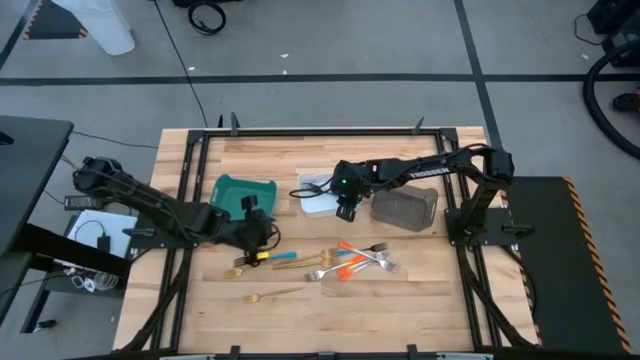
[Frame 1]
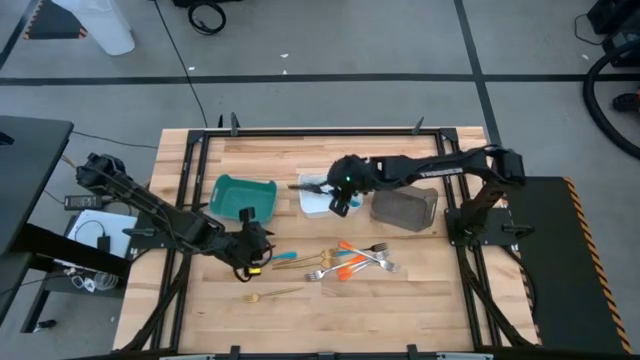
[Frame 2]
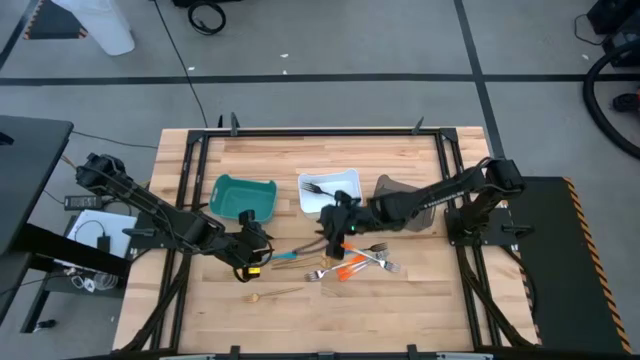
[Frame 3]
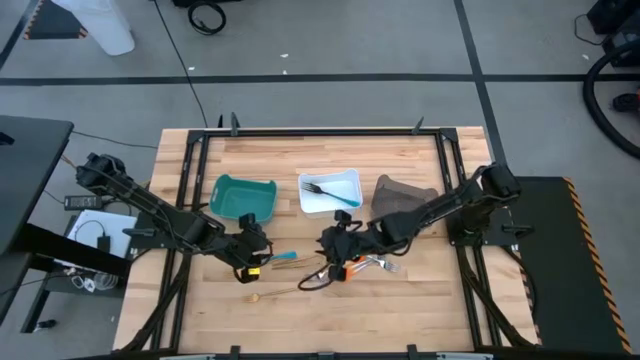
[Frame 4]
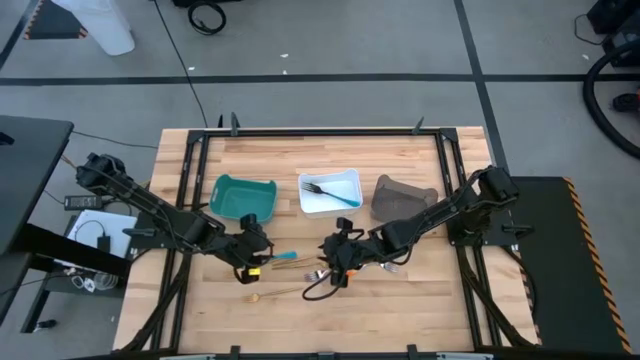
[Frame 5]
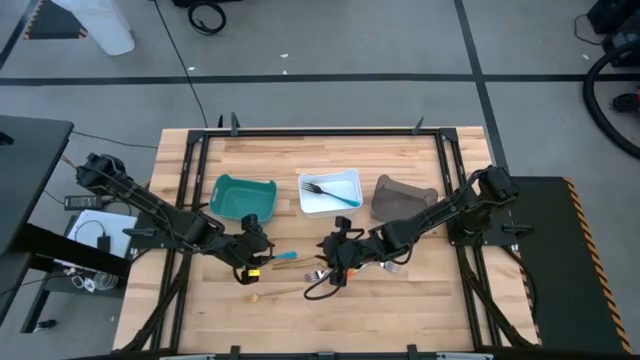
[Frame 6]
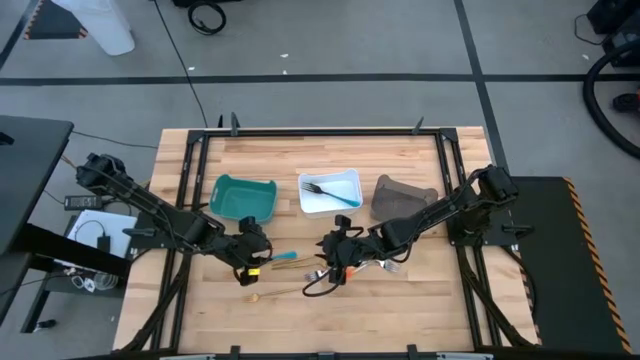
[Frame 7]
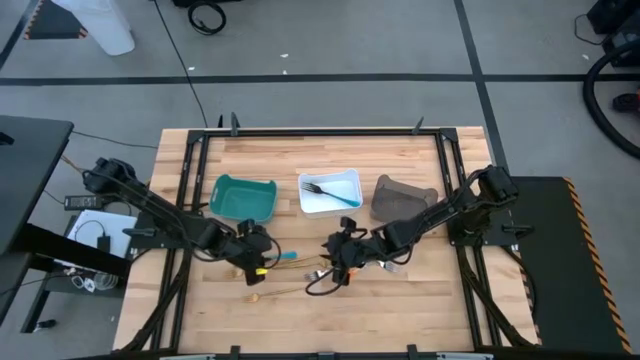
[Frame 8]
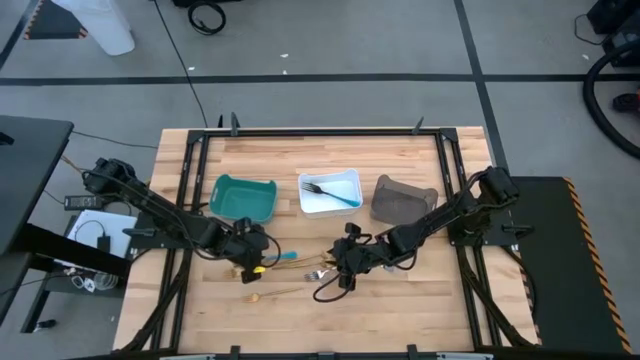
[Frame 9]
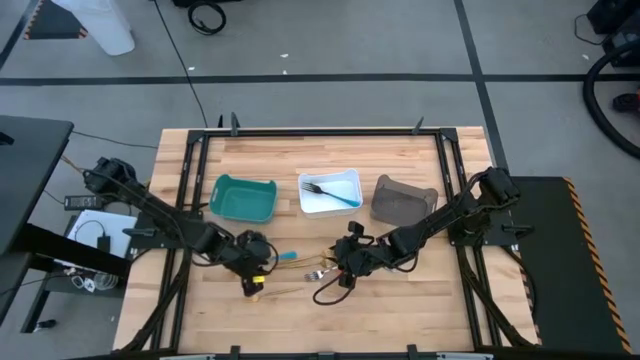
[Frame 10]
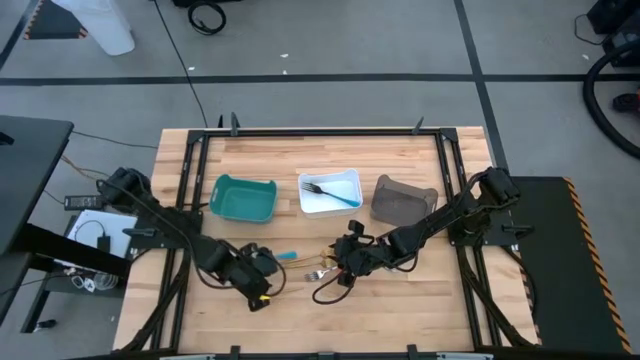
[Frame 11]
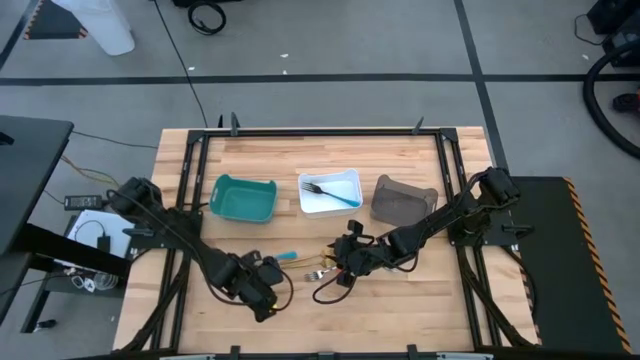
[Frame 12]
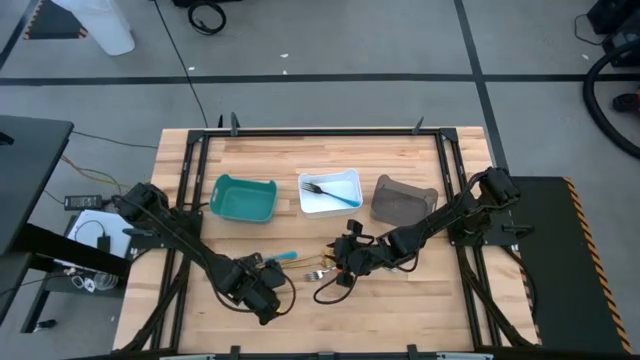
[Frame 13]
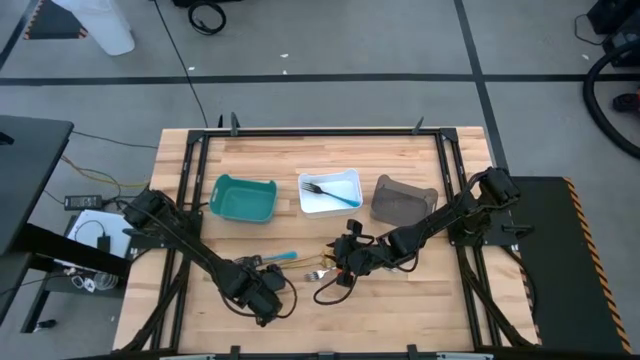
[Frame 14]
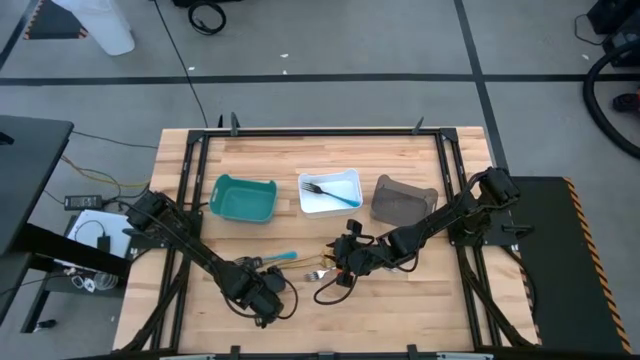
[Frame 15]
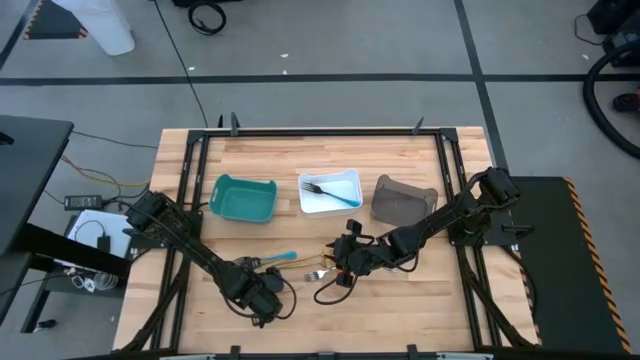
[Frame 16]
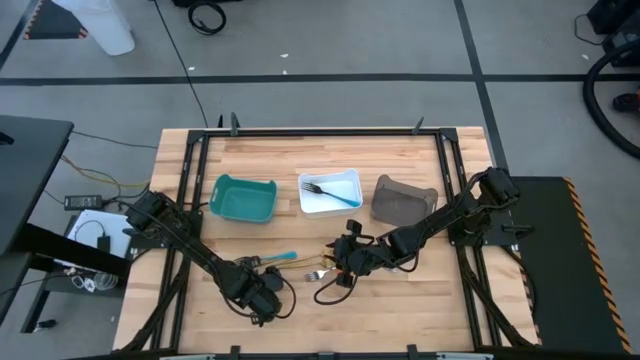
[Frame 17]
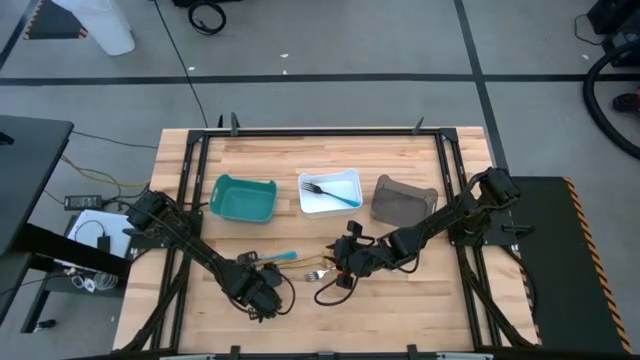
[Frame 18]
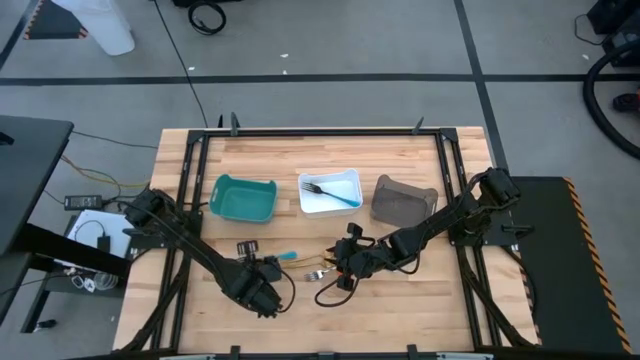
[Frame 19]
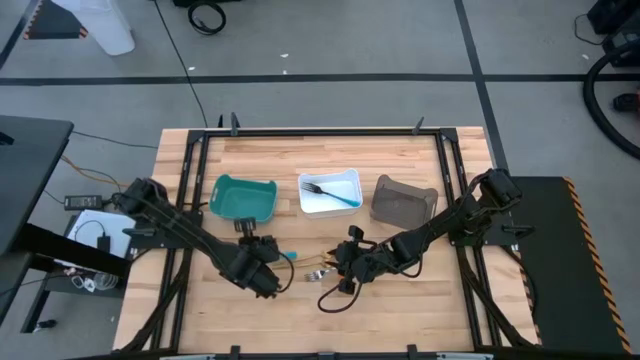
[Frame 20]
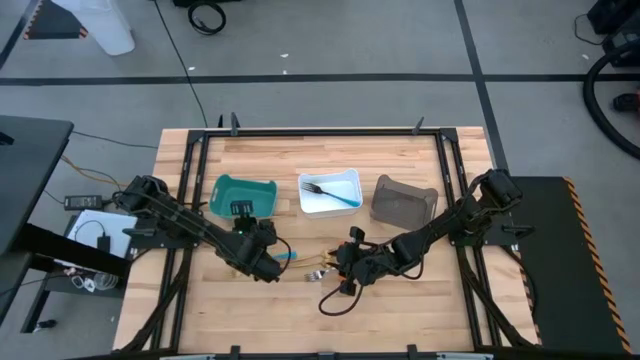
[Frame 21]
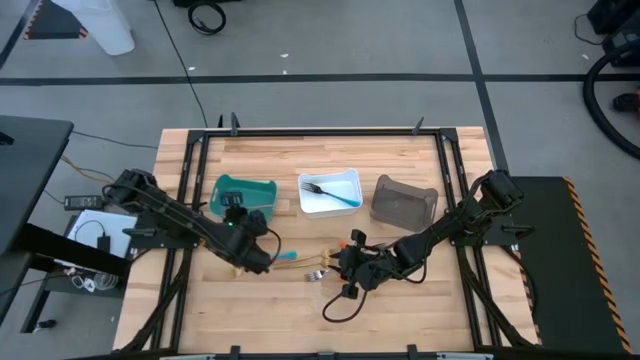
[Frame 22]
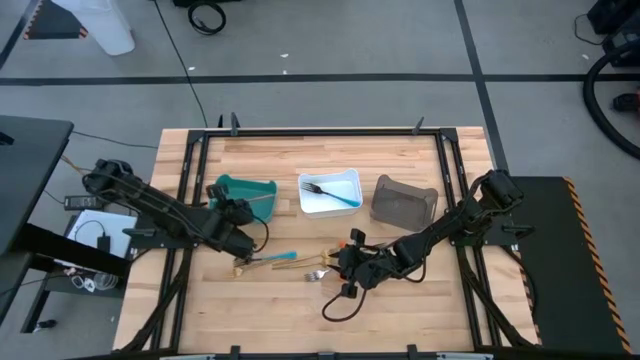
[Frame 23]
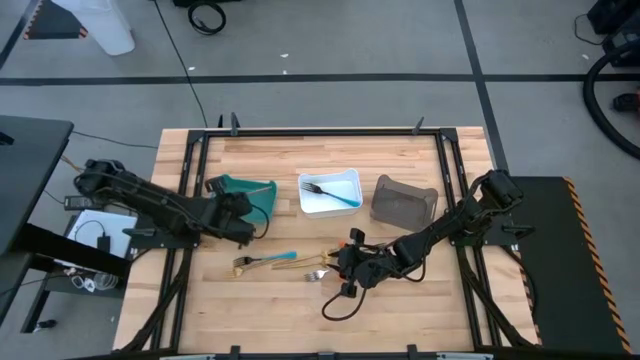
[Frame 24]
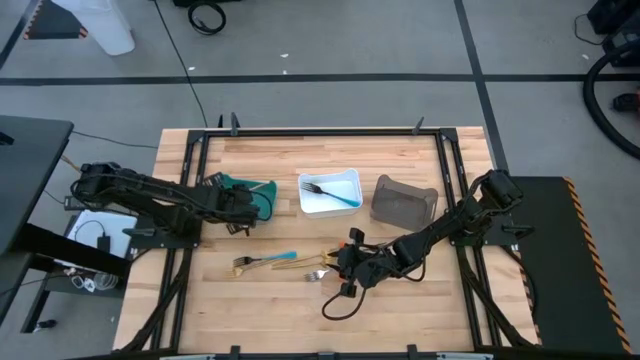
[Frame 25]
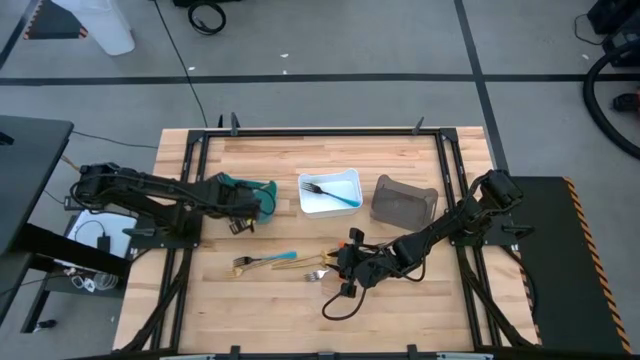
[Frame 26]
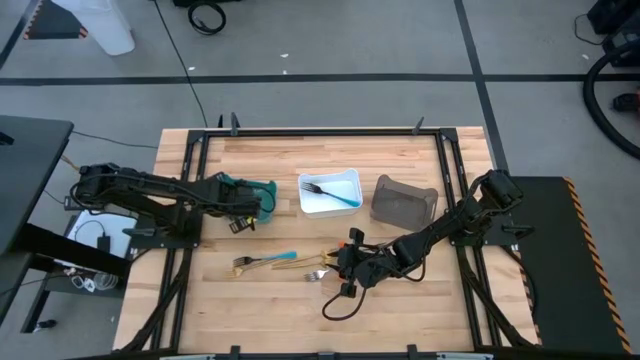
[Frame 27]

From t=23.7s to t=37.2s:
Task: Sort silverware by color (type)
Put the gold fork into the green bin

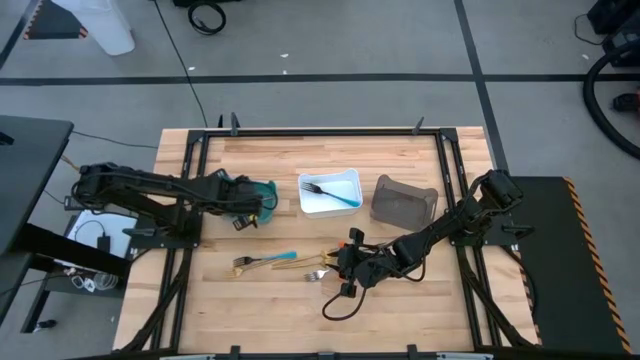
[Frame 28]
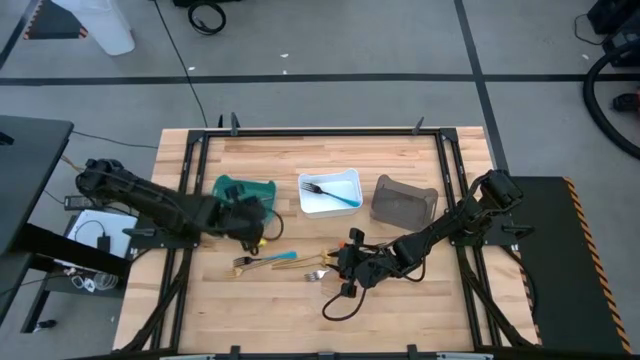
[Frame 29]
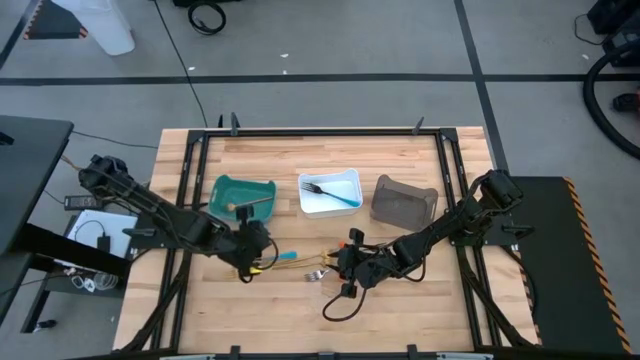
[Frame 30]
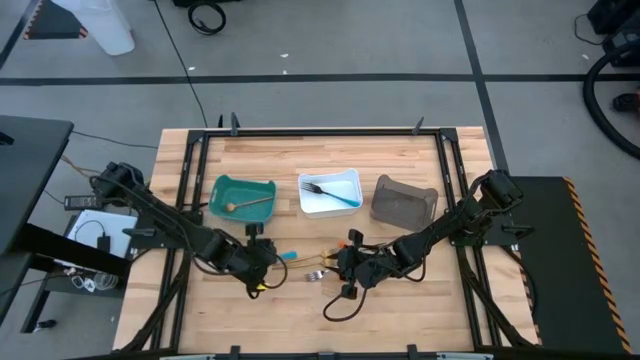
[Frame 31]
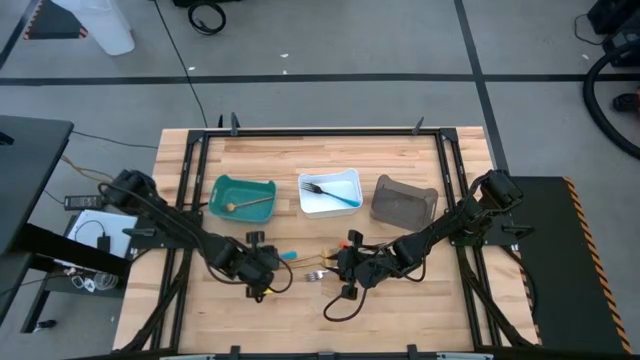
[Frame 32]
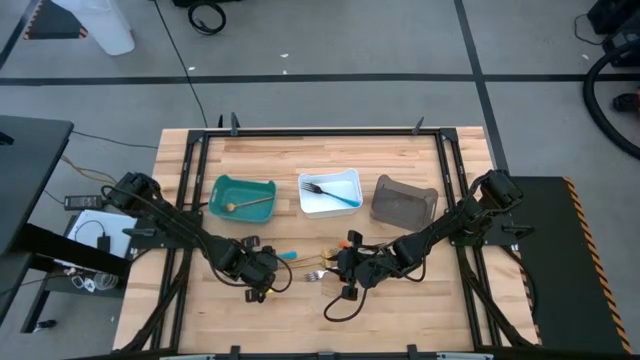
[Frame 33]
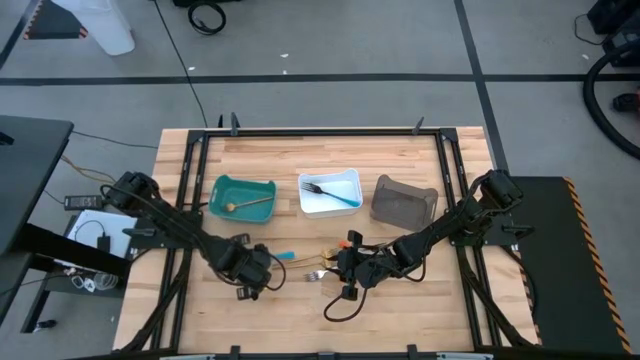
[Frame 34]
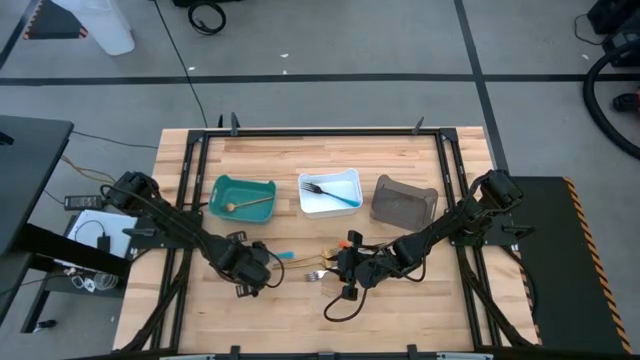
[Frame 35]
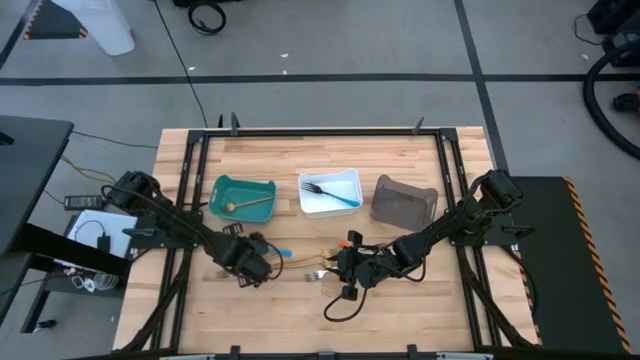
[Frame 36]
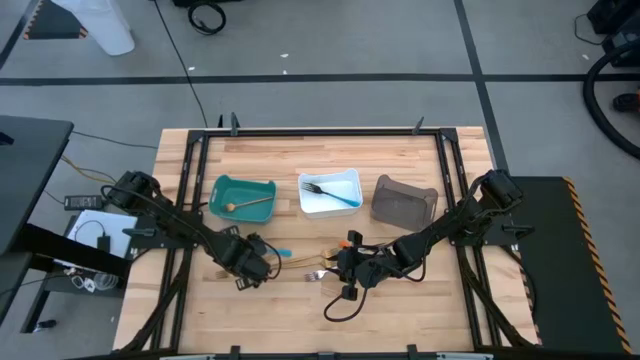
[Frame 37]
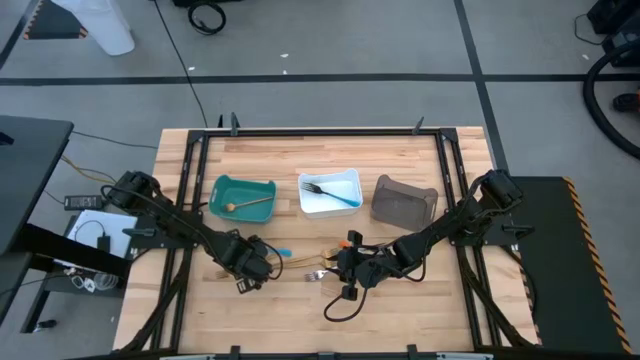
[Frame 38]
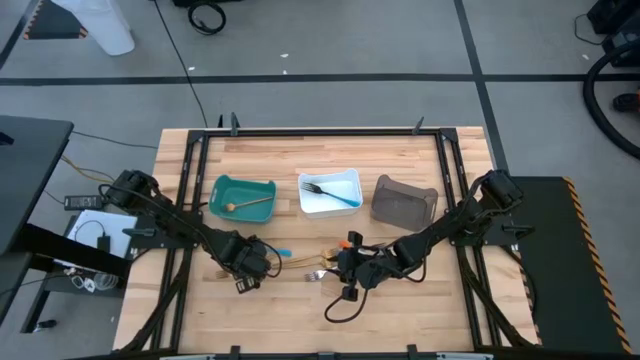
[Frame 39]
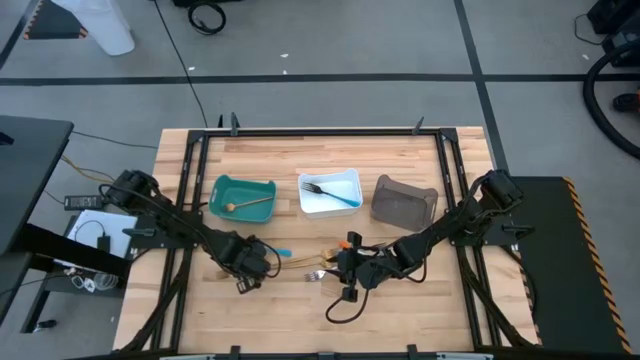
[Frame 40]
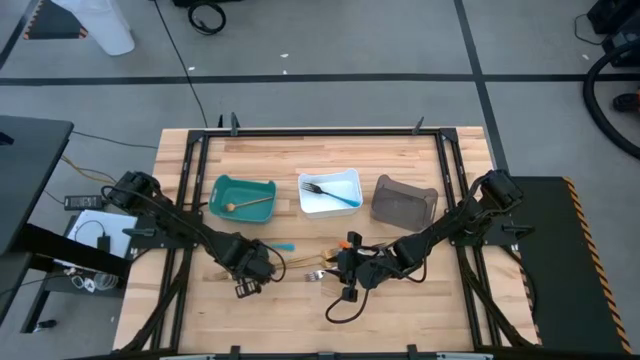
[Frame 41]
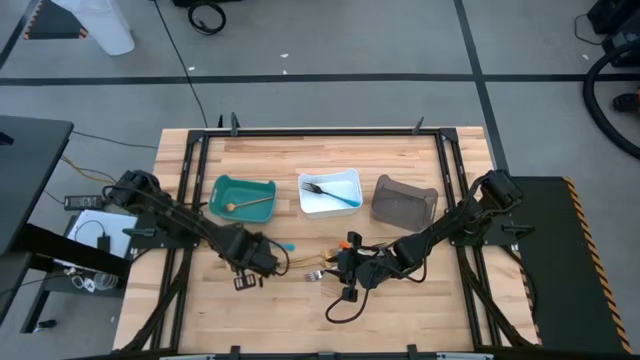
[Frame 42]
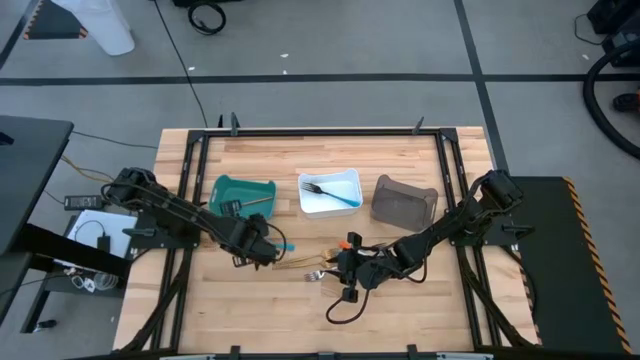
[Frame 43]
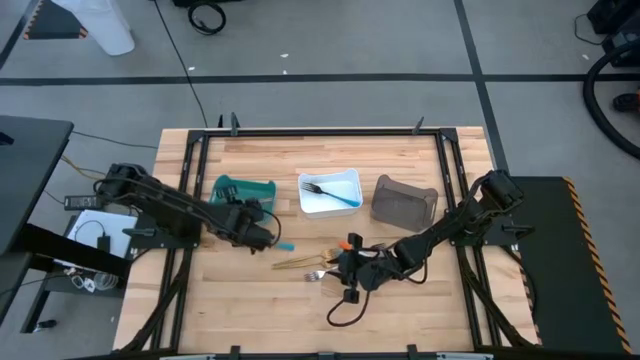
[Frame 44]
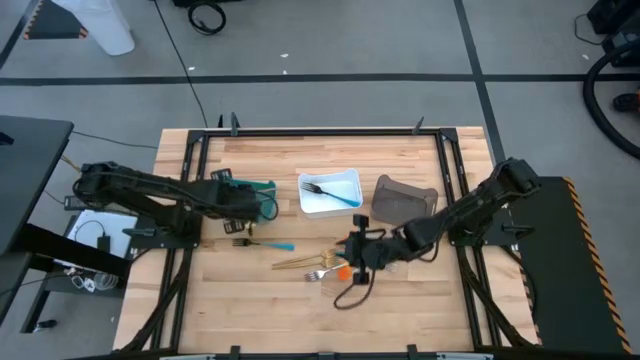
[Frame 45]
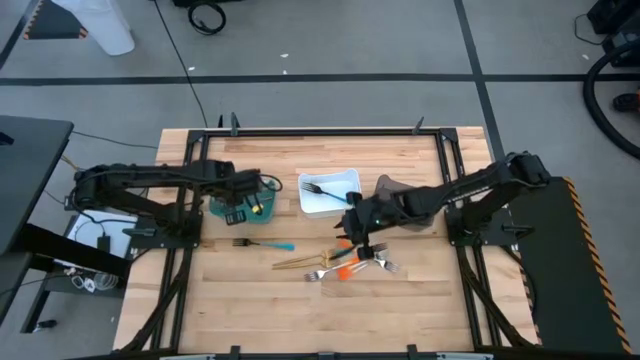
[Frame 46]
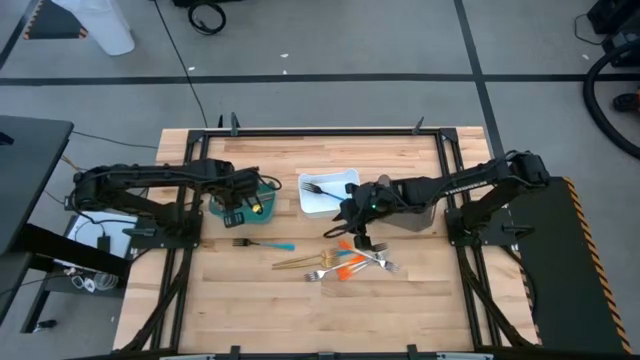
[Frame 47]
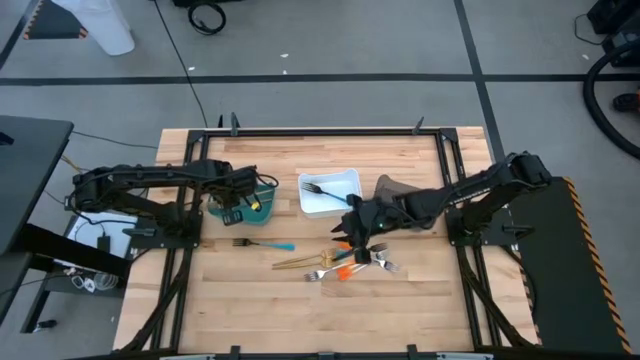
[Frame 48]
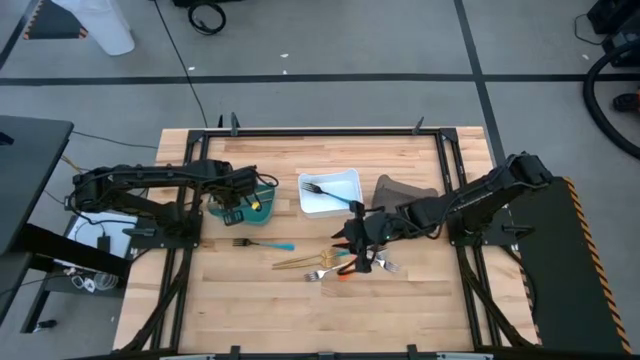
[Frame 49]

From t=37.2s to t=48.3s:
Put the gold fork into the green bin
